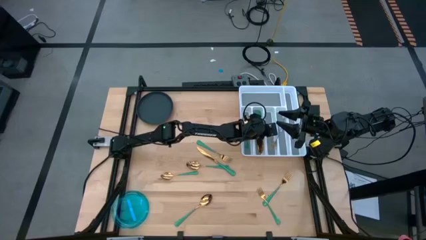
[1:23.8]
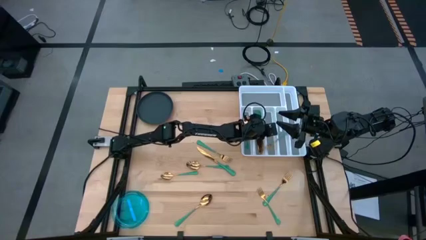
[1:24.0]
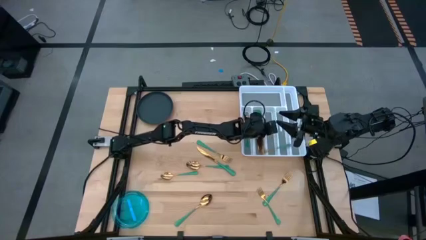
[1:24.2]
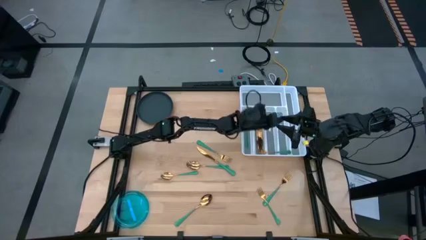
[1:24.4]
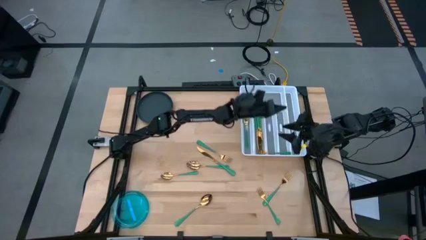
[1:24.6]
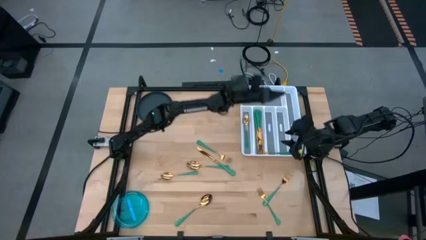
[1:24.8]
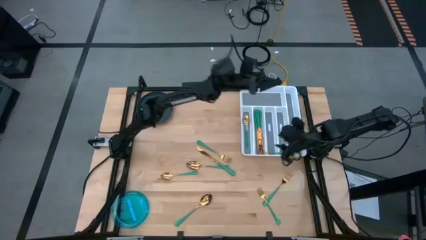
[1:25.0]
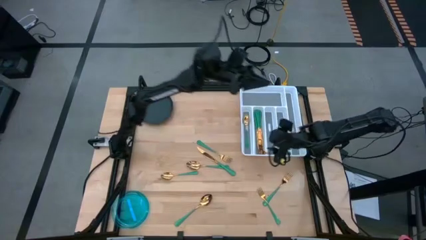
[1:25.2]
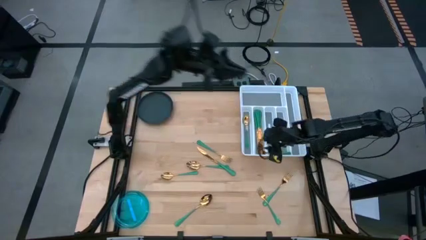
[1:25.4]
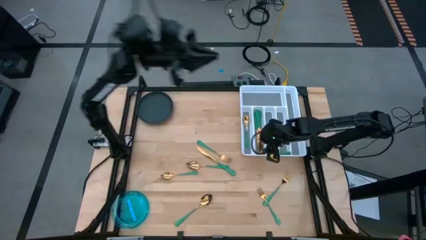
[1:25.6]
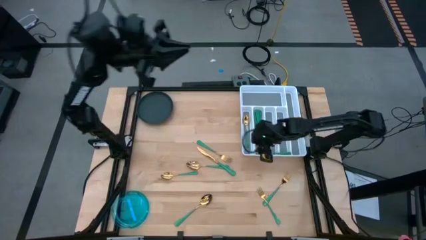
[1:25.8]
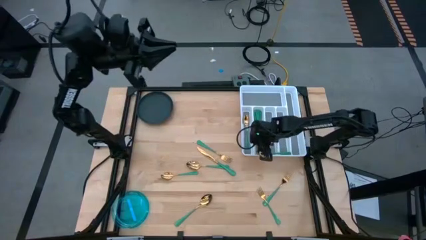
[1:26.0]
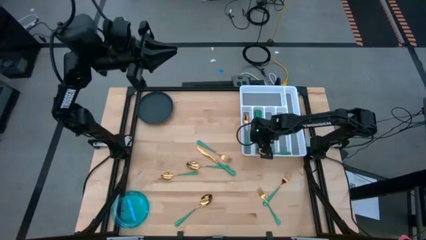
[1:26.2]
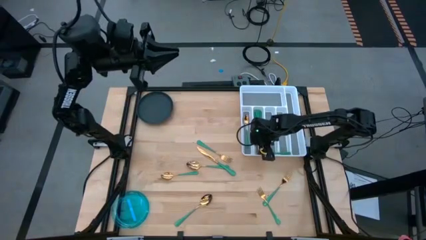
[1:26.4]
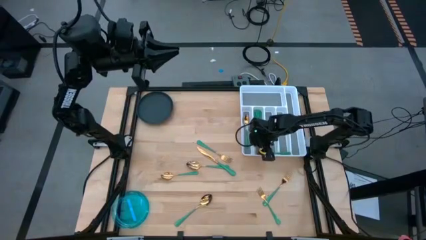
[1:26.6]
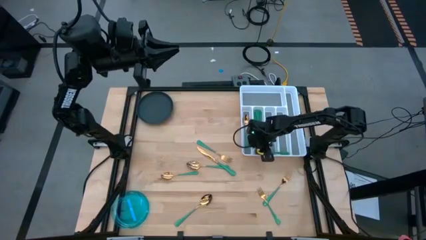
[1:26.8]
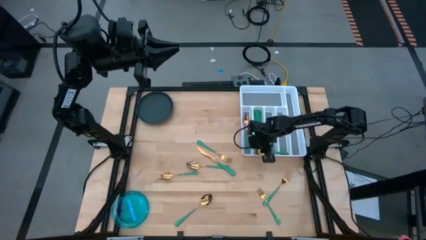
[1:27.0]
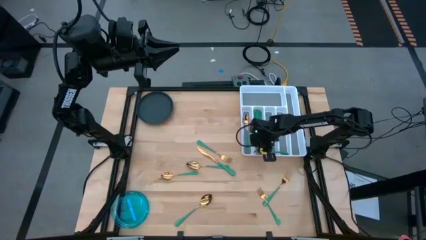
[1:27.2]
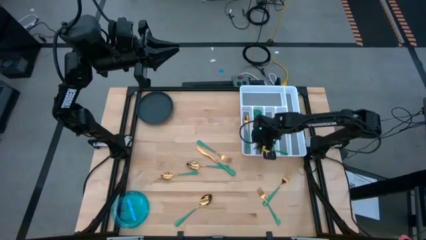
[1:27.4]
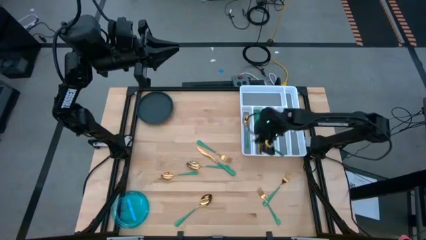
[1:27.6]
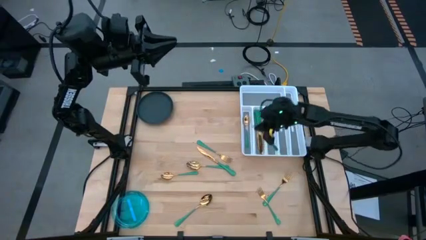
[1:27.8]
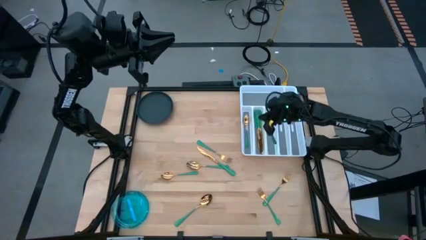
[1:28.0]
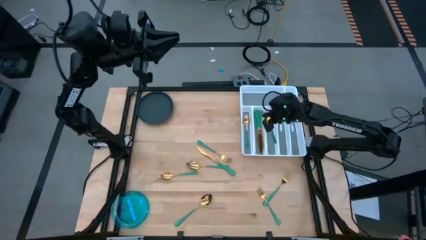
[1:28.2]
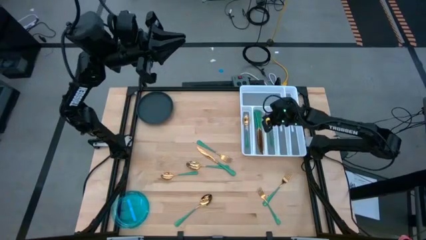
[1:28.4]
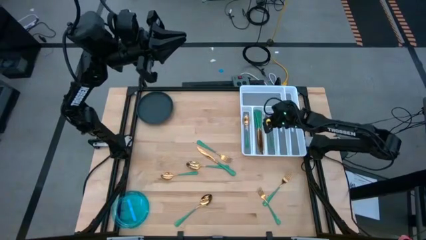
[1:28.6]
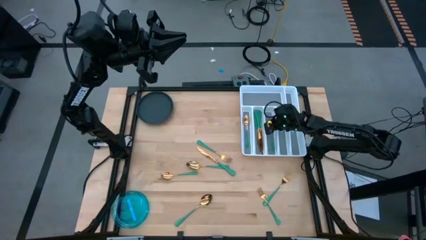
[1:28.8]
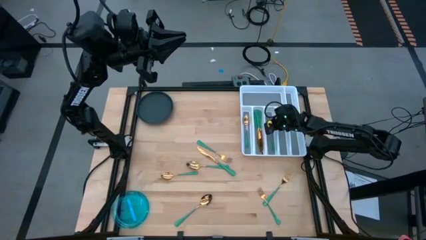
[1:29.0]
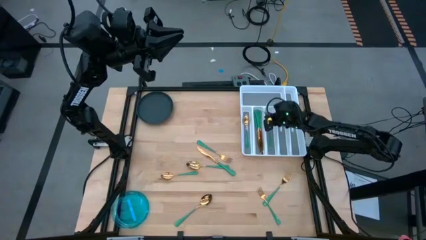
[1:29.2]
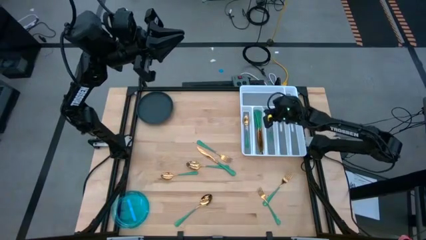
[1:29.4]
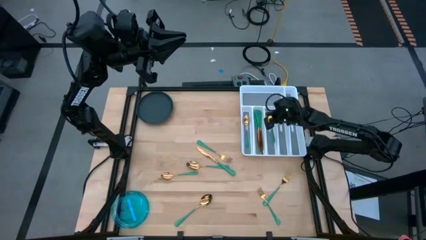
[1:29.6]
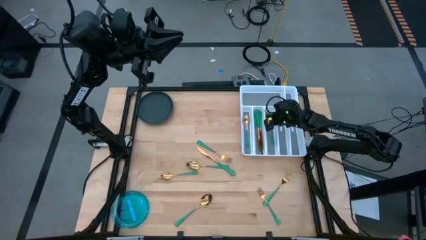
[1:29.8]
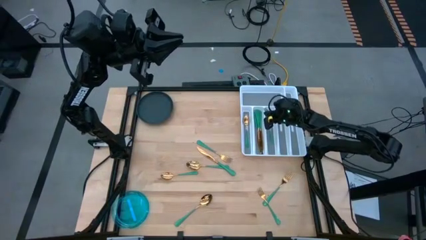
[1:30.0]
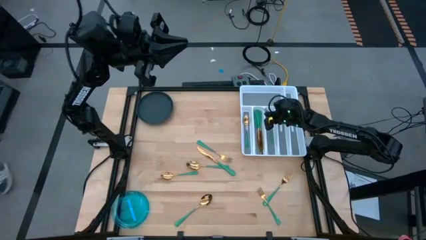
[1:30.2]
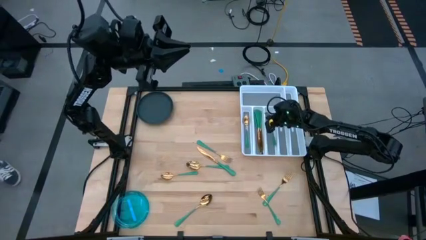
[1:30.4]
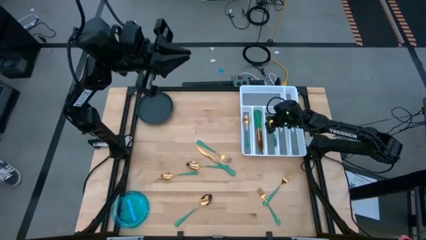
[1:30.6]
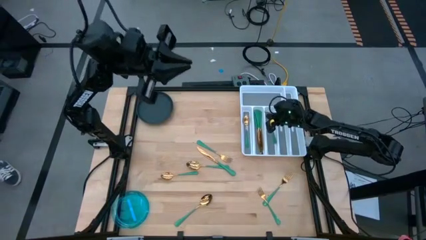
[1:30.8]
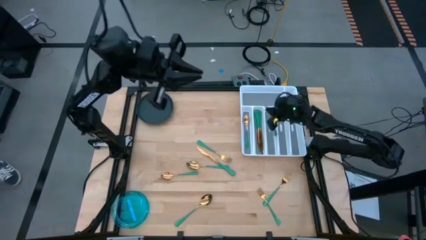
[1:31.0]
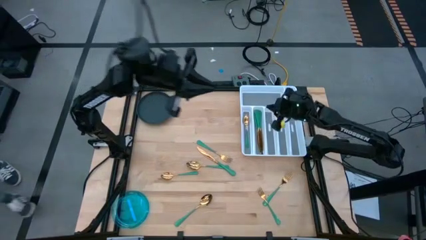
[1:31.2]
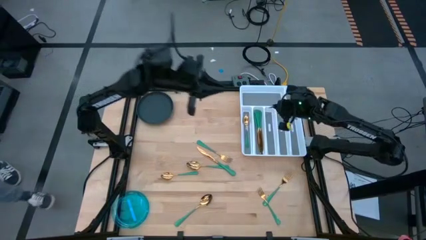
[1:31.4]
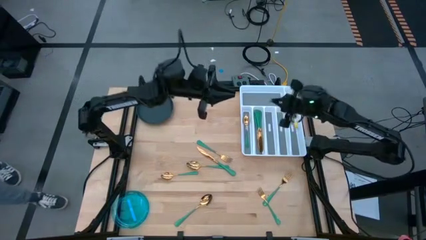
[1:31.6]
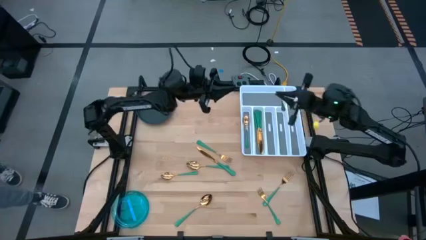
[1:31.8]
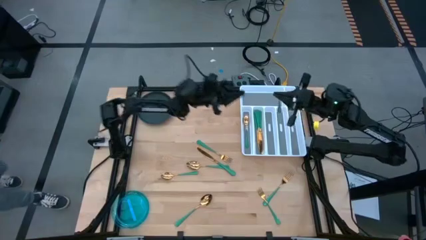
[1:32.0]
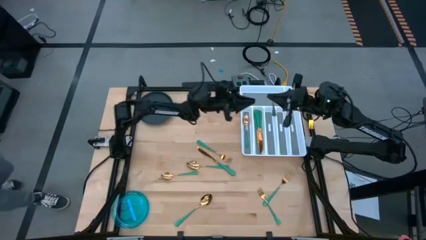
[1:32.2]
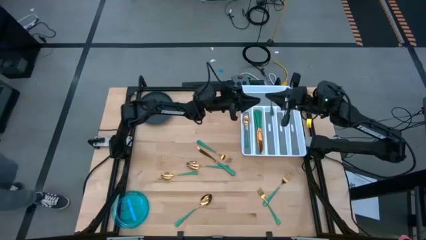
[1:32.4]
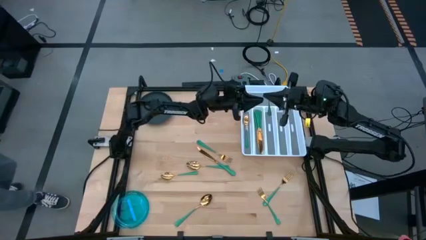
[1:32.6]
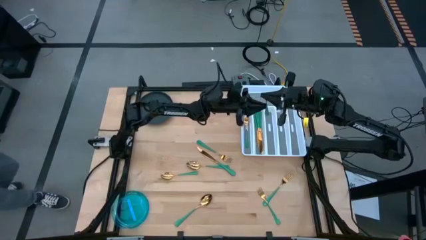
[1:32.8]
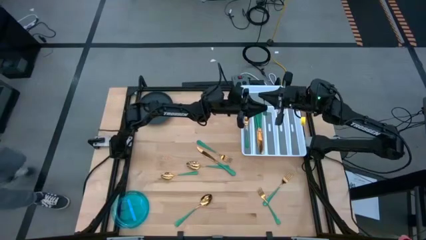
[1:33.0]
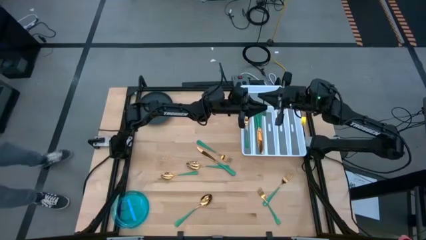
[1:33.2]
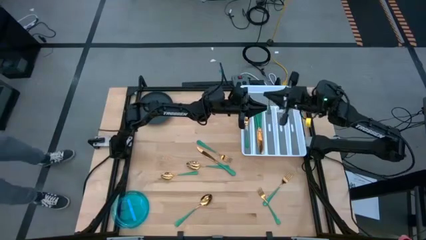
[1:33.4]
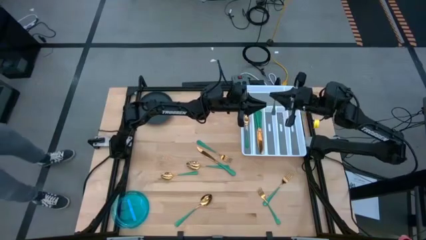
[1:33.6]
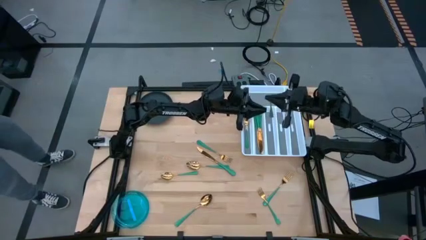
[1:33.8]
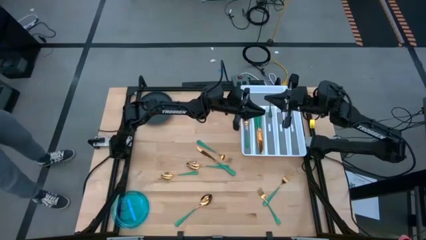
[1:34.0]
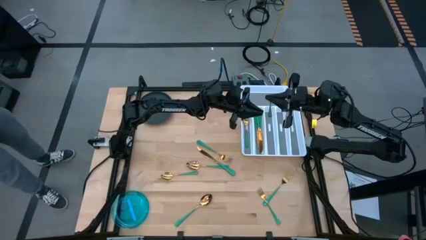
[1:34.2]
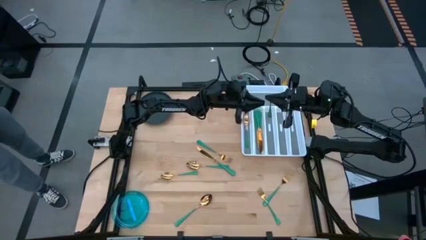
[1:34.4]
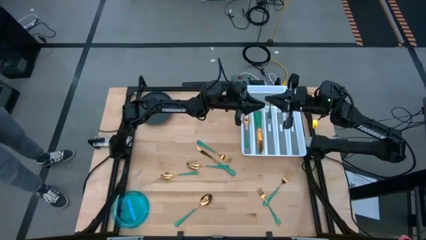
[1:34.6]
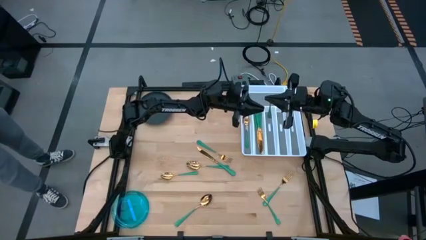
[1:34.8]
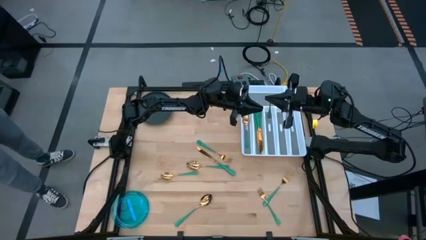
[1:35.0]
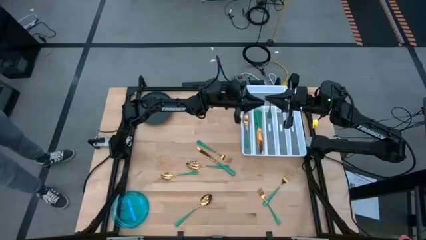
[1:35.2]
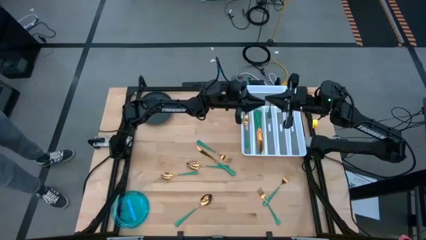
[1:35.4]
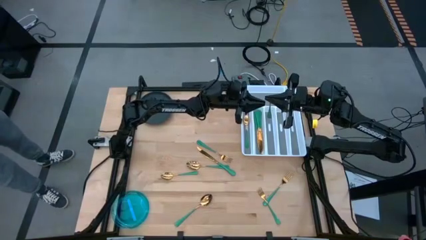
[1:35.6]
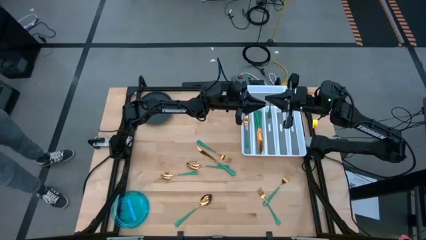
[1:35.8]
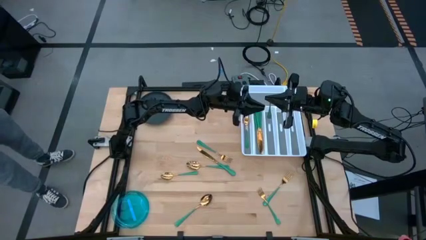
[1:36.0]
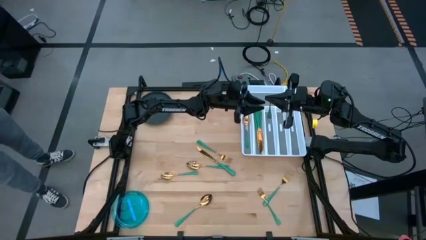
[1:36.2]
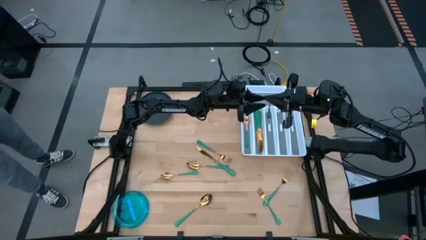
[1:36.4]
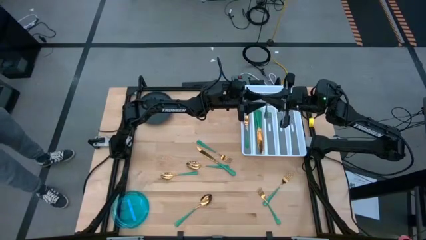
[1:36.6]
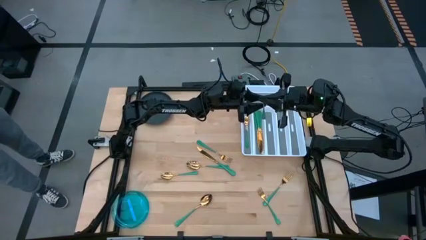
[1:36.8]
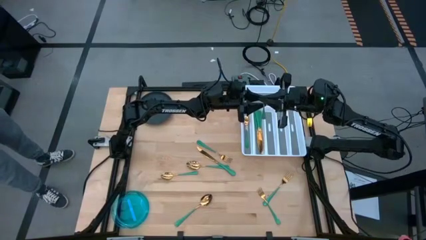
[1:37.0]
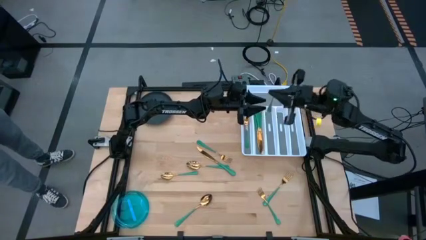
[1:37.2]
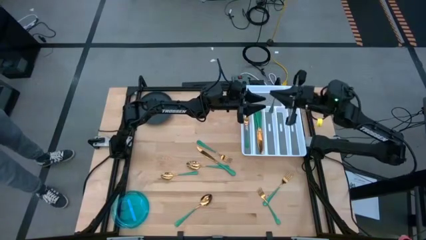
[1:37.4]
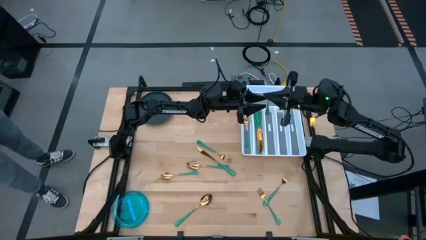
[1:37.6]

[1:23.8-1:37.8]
Task: Sort silverware
Put the green fork into the silverware tray
